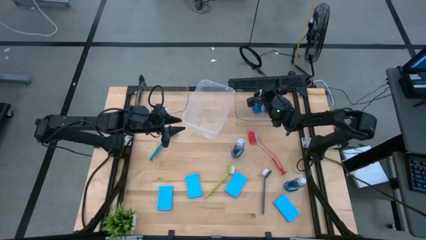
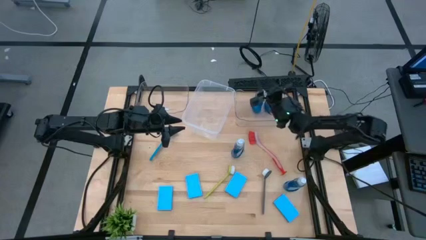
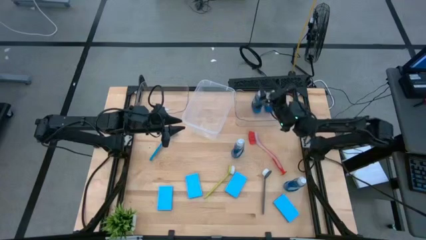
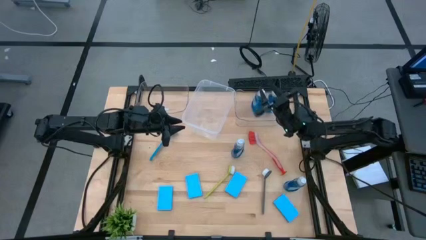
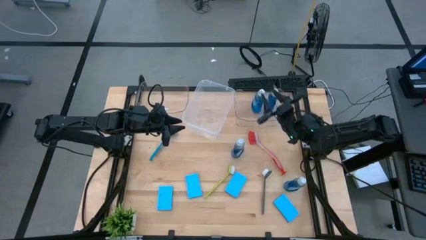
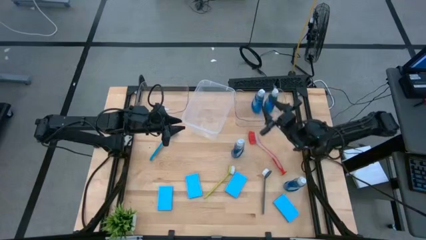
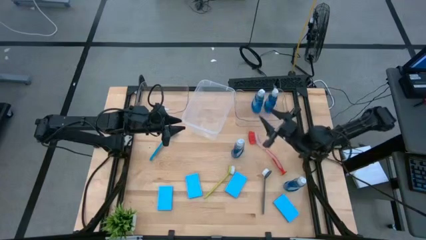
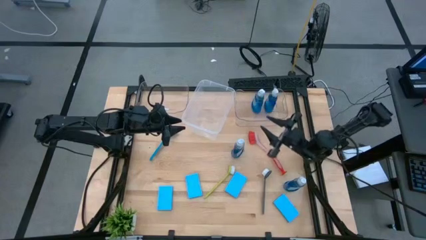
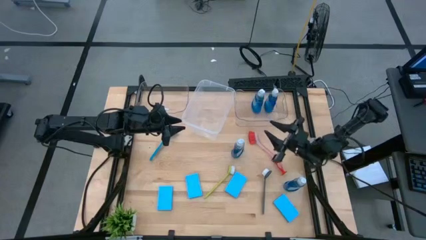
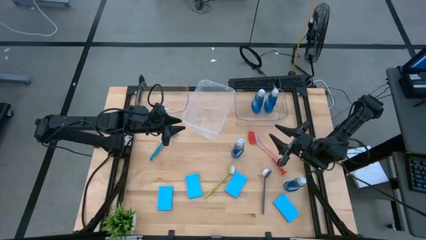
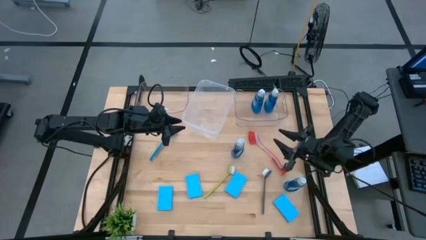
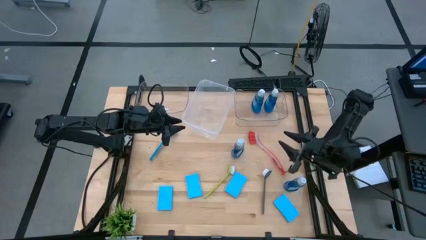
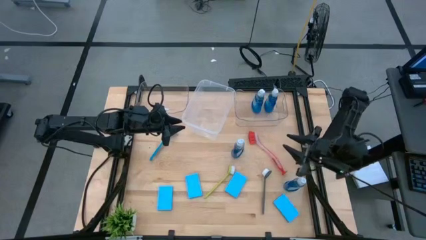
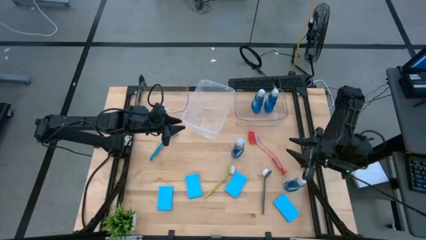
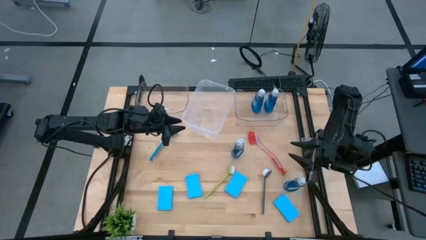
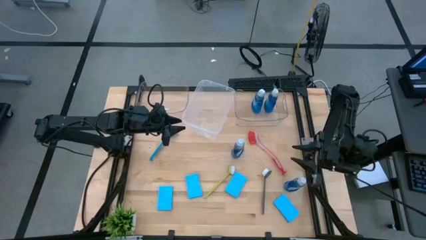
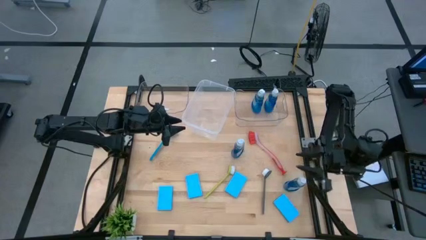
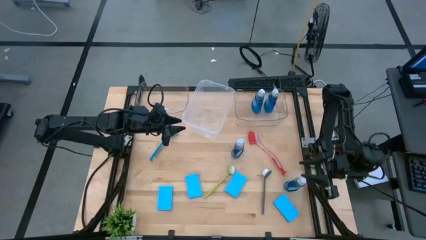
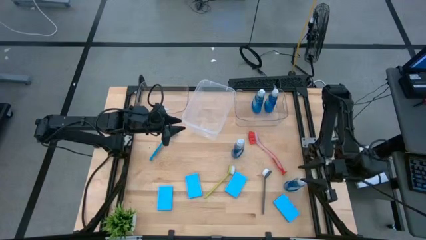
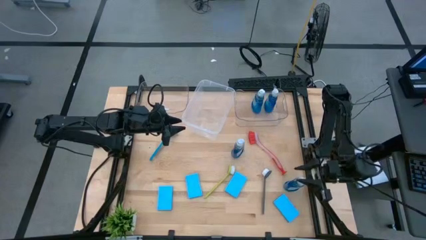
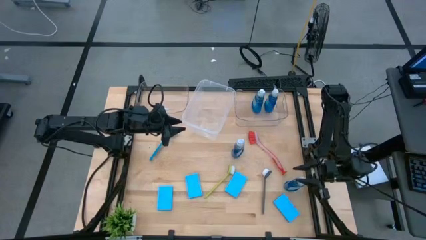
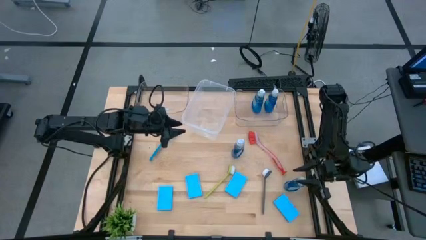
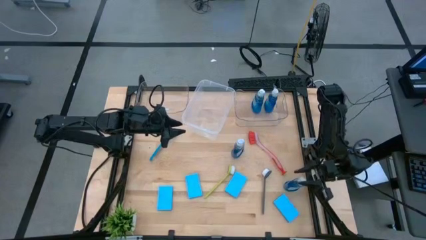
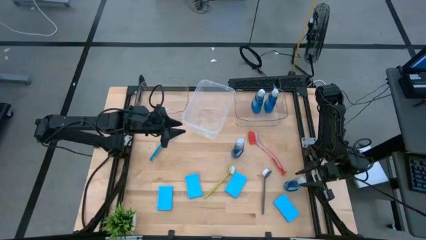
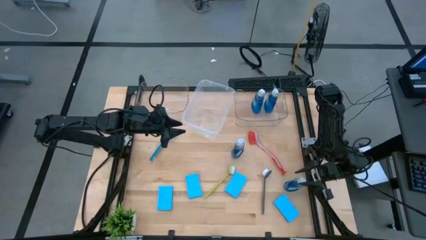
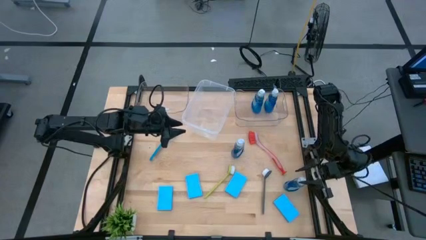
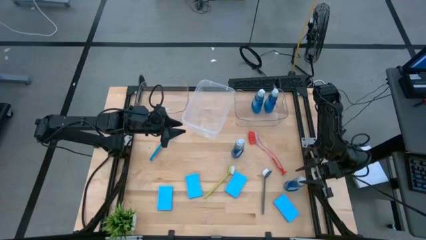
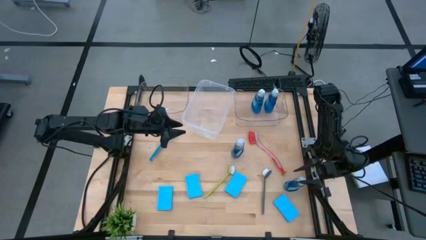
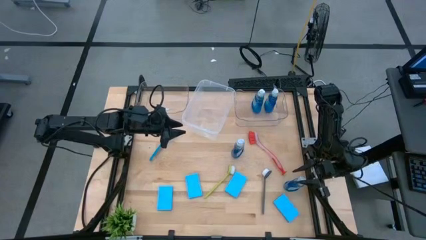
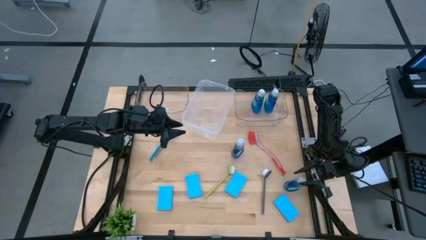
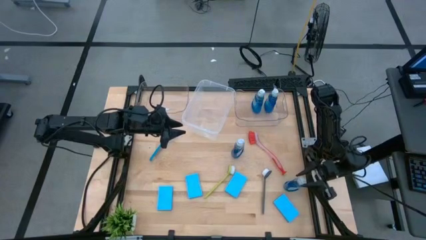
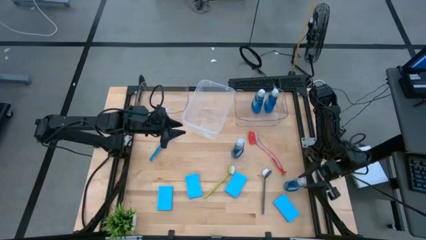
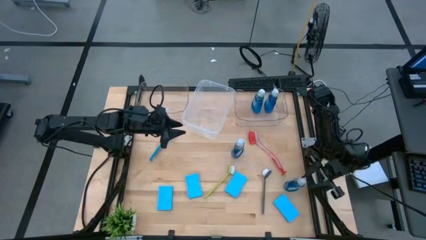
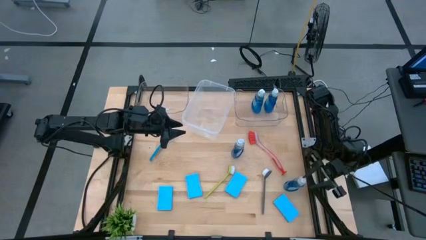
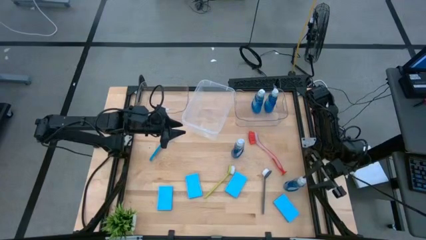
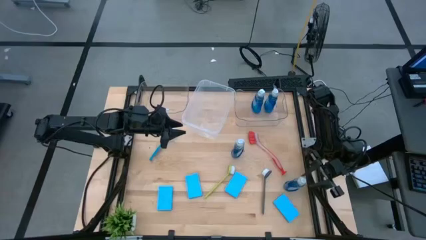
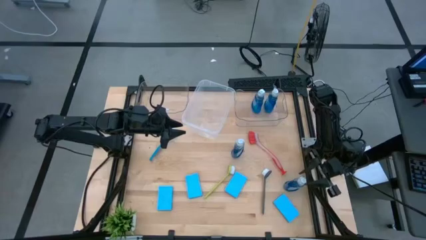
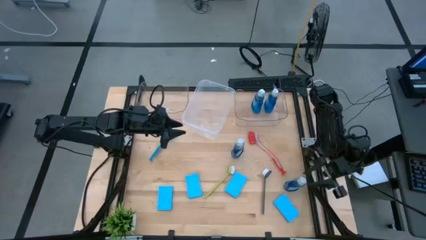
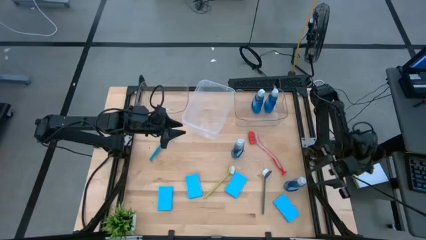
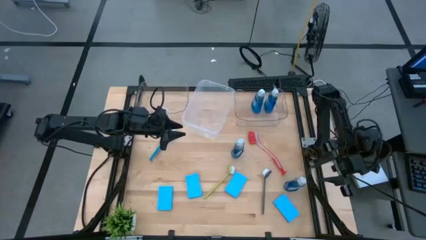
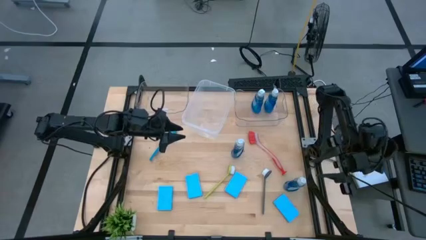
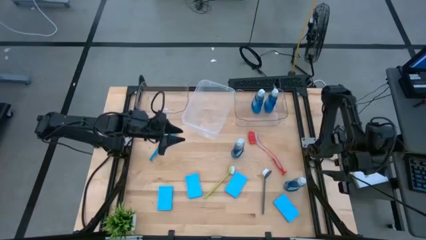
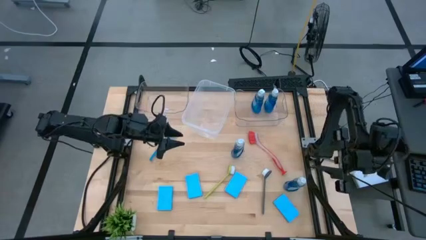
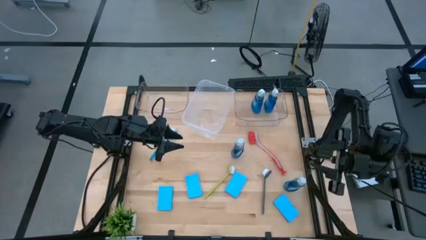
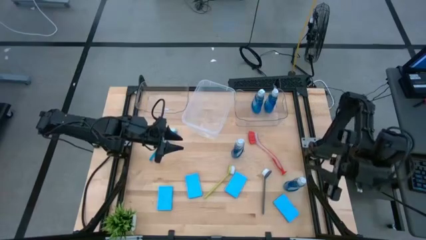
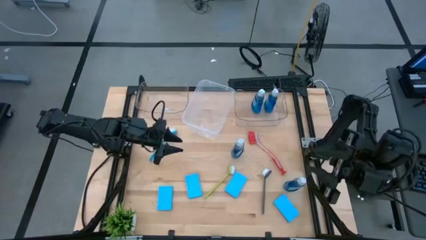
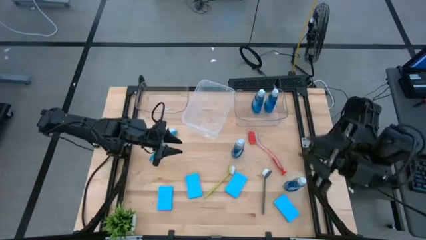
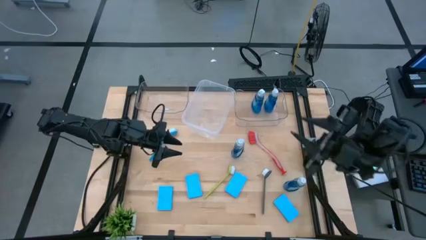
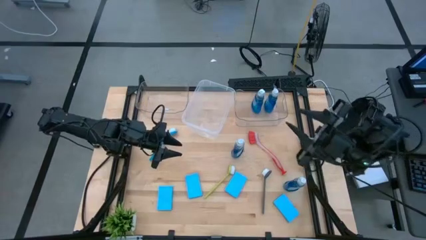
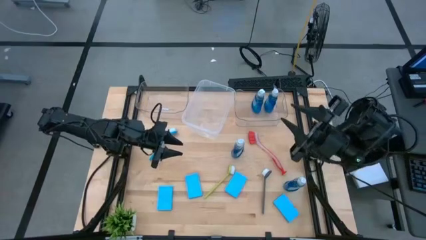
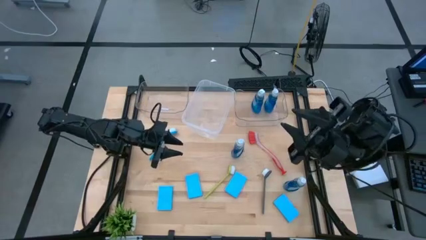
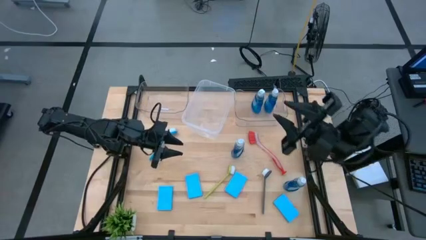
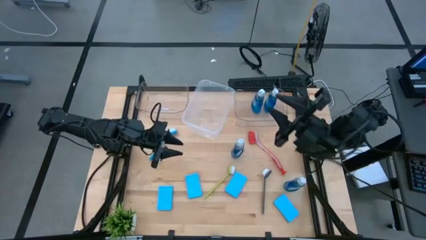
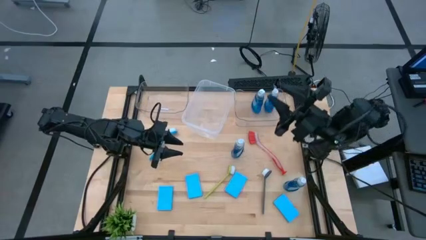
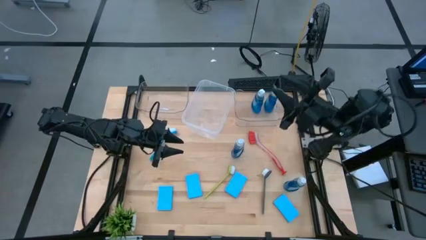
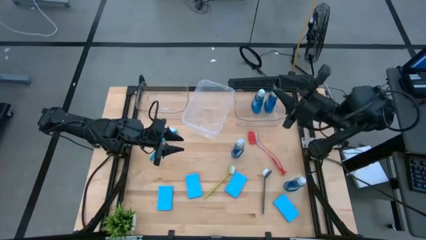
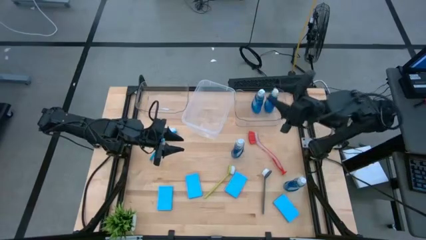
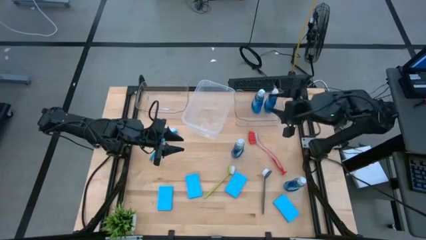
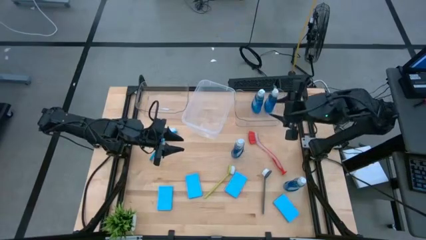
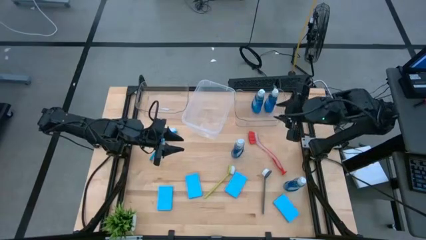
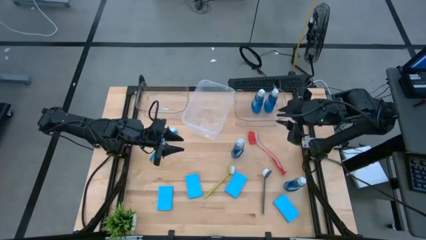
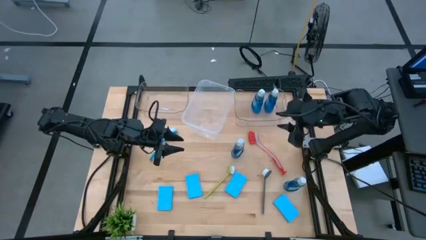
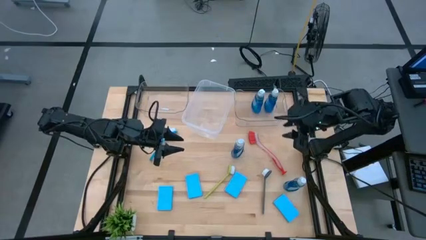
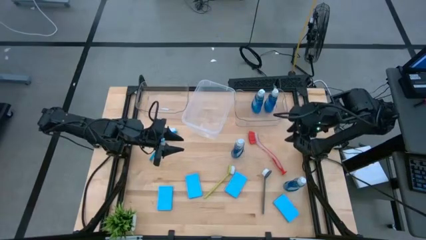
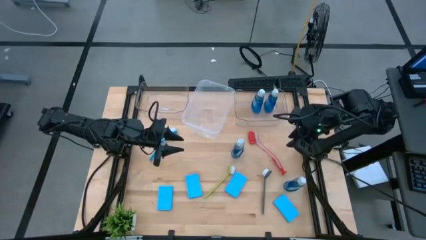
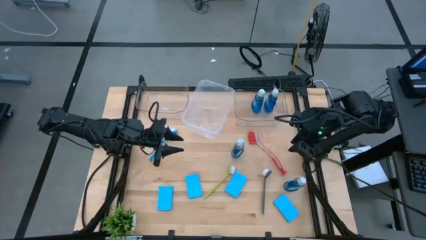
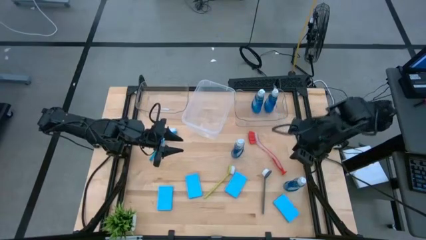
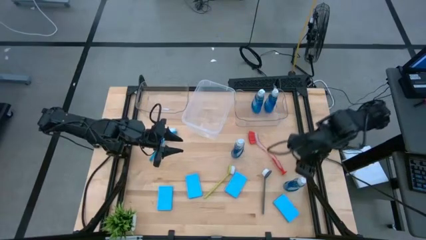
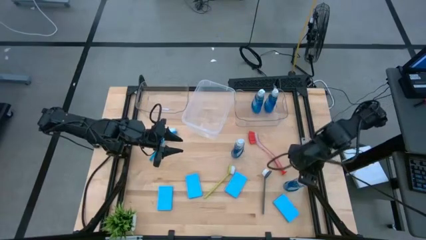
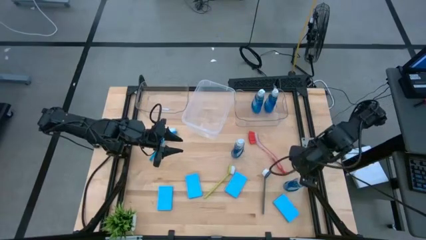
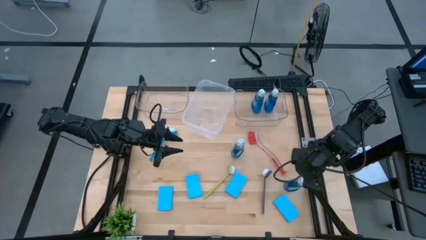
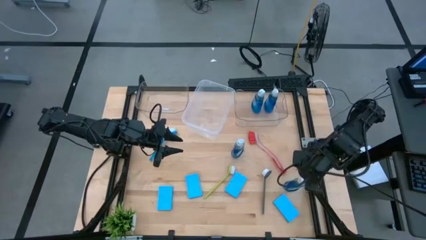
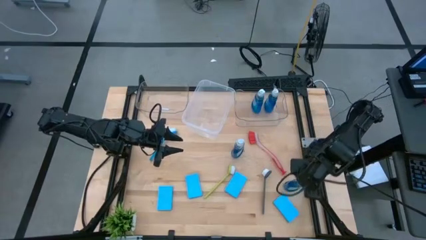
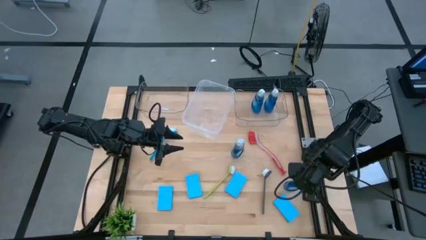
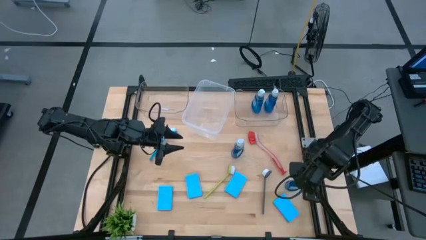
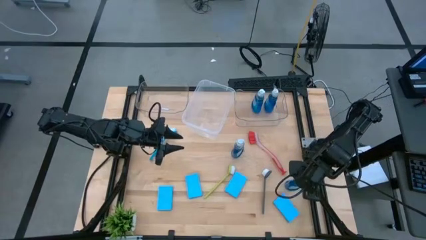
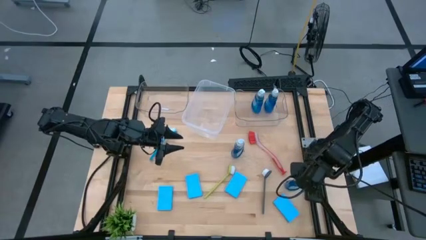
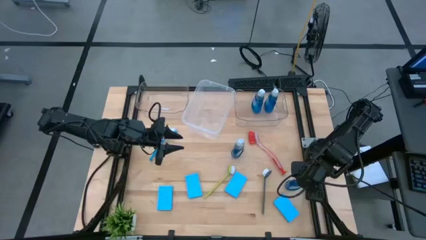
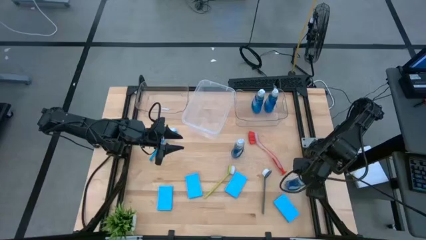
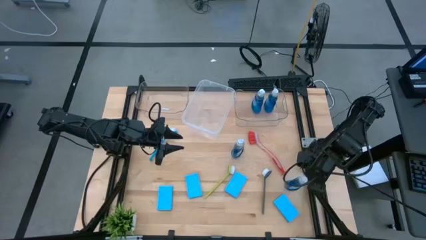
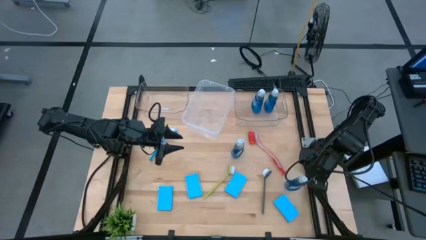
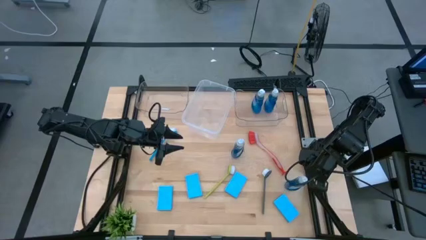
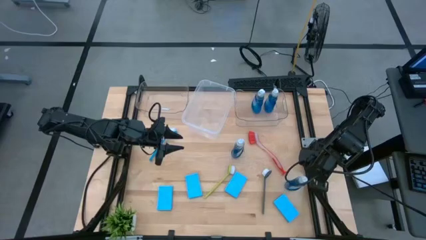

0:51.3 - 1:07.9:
Task: Pick & Place Kitchen Sink Supplies
Put the blue soap dispenser into the right transparent bin
